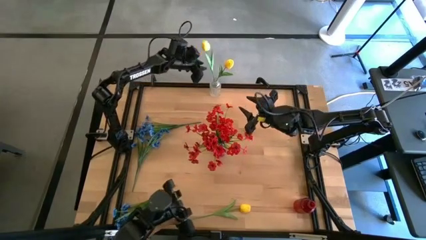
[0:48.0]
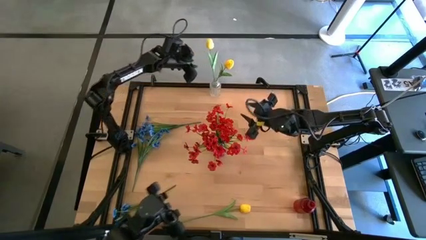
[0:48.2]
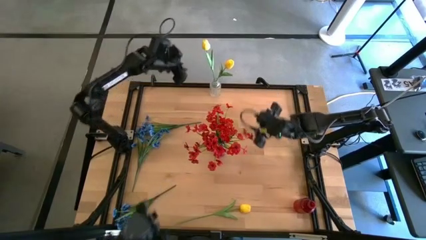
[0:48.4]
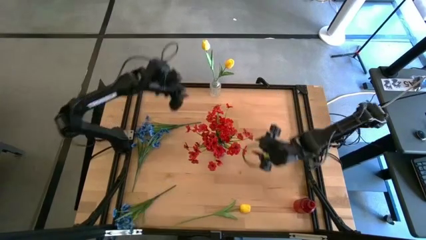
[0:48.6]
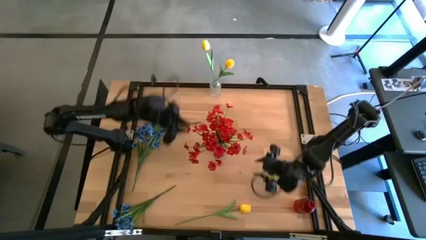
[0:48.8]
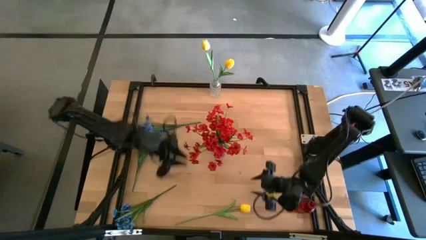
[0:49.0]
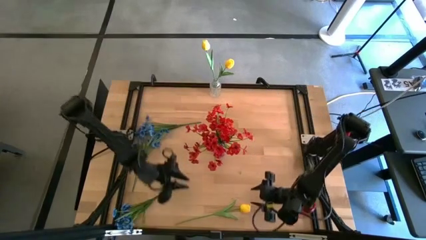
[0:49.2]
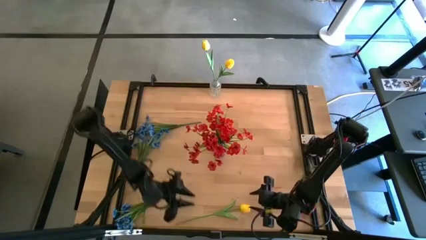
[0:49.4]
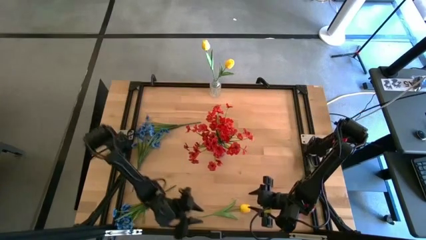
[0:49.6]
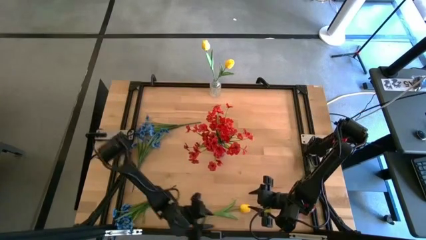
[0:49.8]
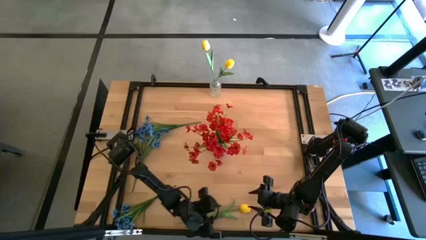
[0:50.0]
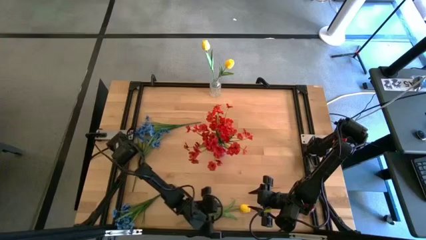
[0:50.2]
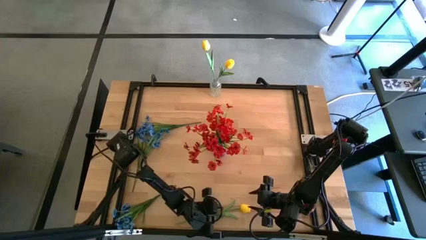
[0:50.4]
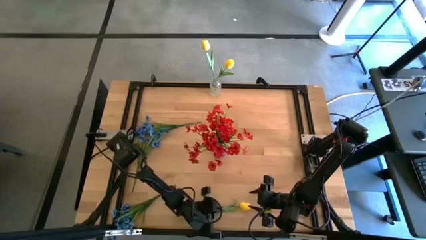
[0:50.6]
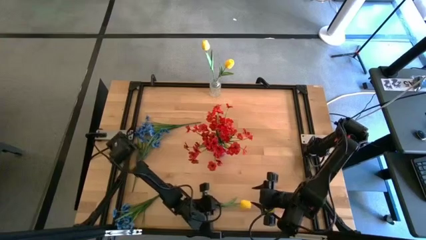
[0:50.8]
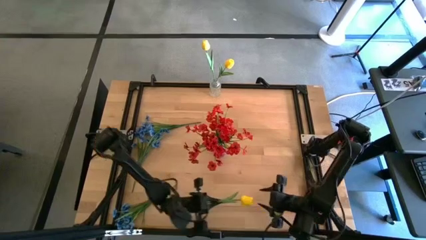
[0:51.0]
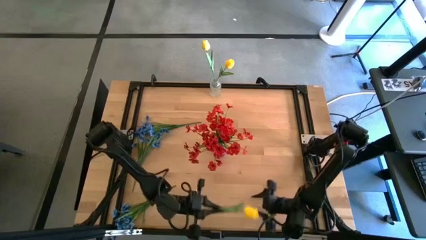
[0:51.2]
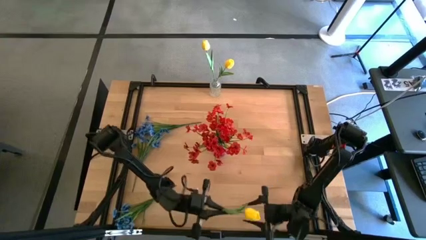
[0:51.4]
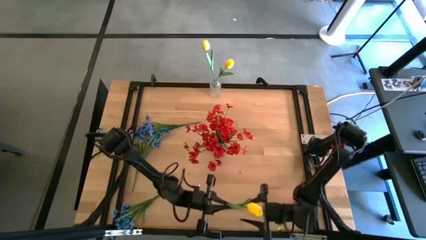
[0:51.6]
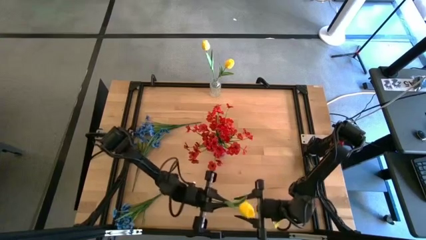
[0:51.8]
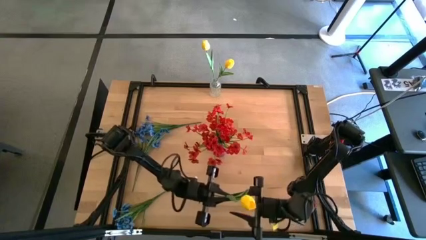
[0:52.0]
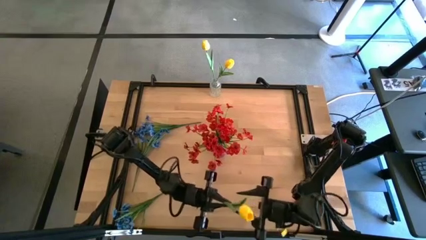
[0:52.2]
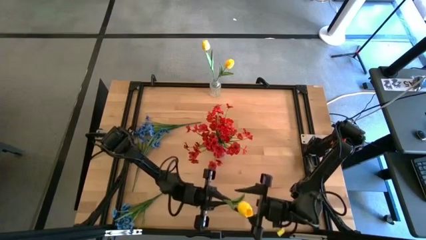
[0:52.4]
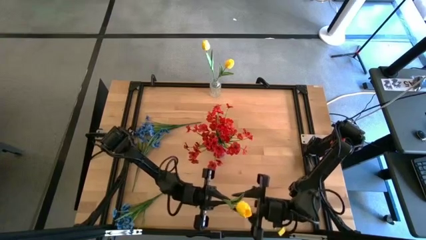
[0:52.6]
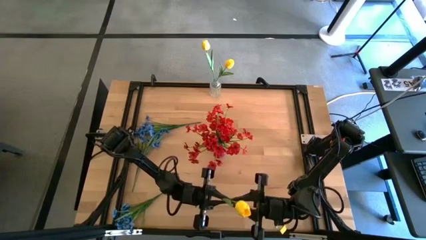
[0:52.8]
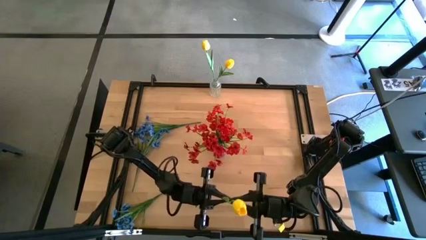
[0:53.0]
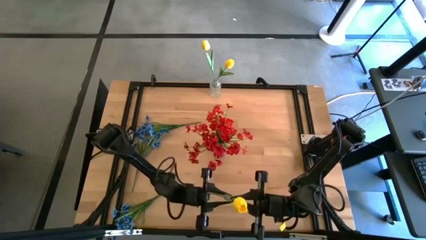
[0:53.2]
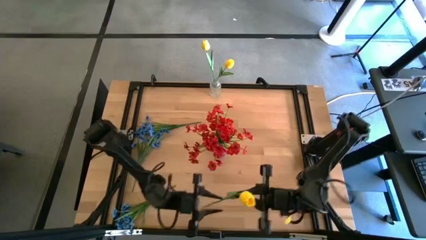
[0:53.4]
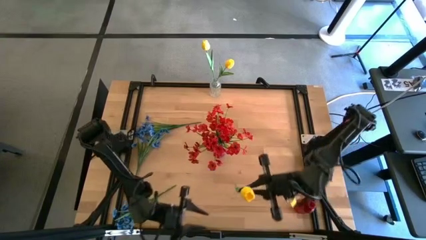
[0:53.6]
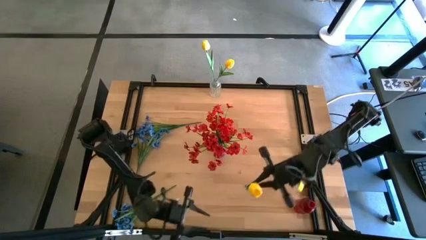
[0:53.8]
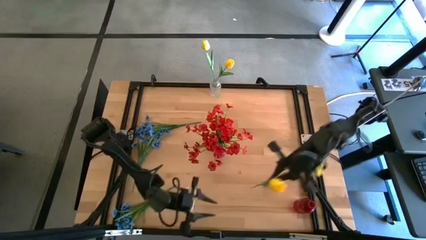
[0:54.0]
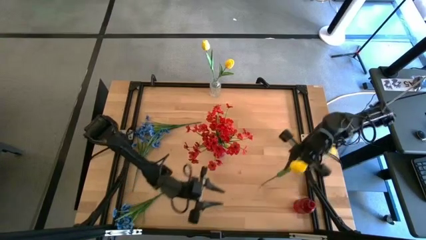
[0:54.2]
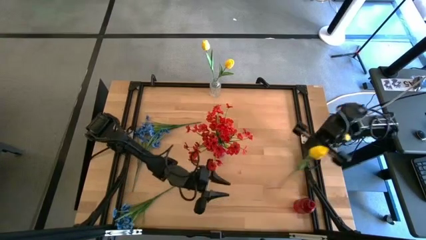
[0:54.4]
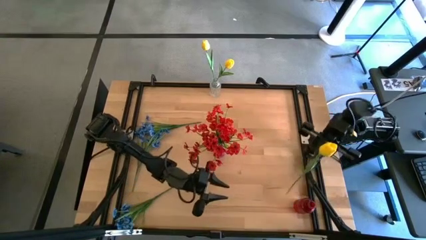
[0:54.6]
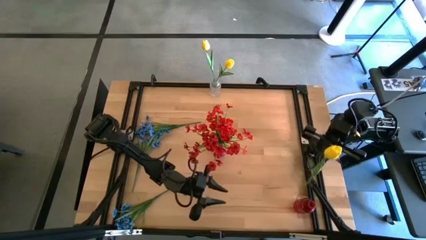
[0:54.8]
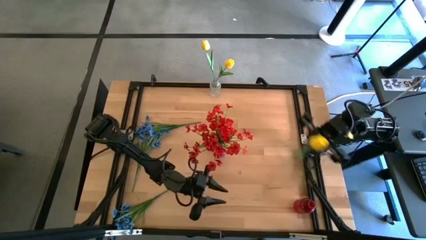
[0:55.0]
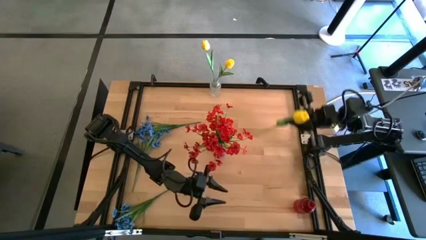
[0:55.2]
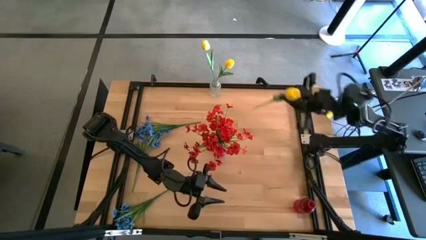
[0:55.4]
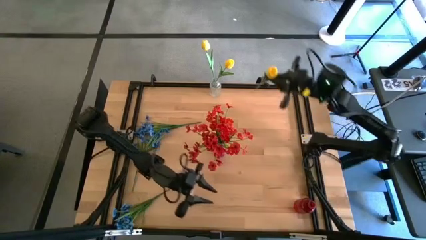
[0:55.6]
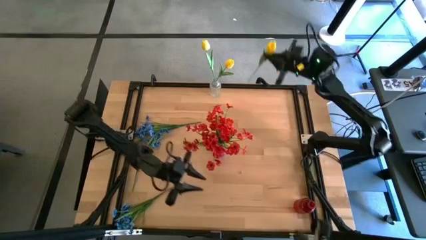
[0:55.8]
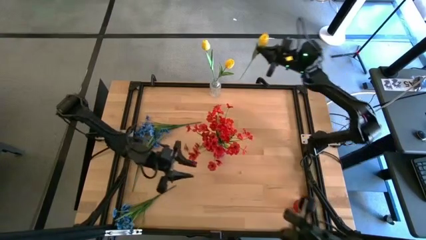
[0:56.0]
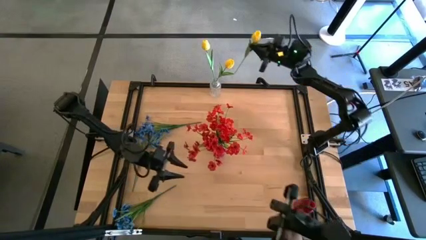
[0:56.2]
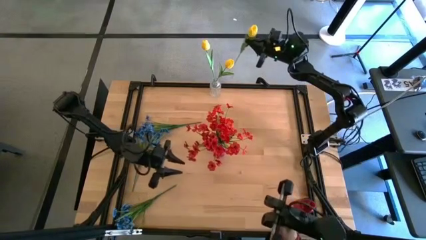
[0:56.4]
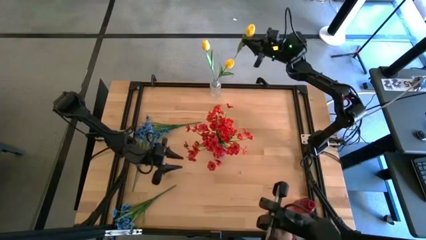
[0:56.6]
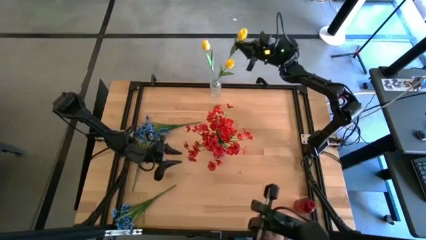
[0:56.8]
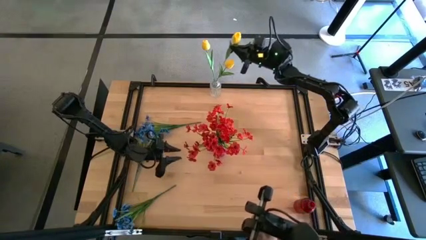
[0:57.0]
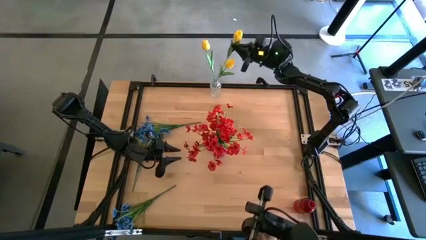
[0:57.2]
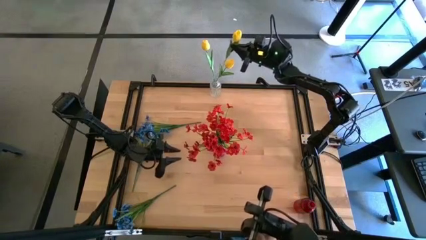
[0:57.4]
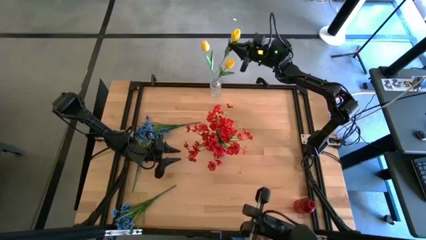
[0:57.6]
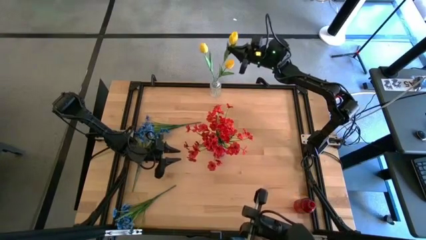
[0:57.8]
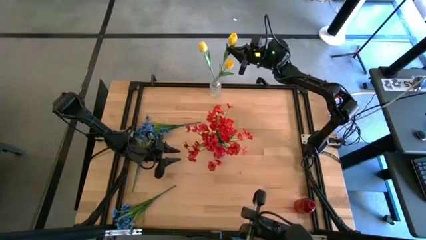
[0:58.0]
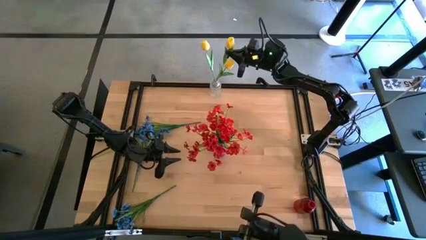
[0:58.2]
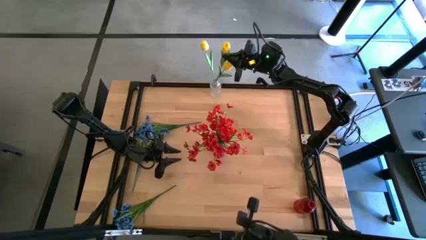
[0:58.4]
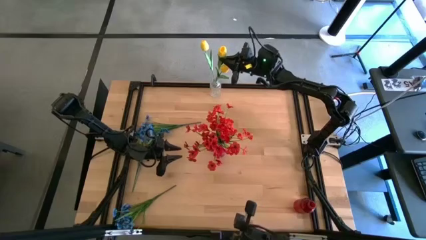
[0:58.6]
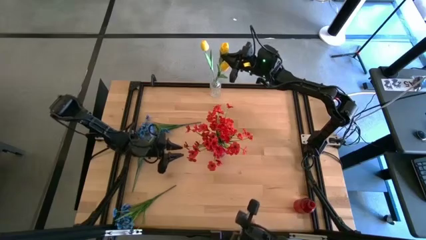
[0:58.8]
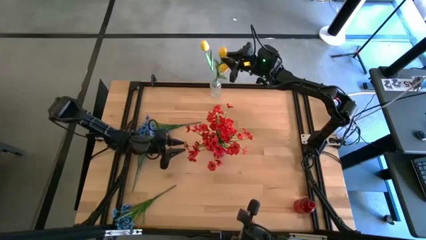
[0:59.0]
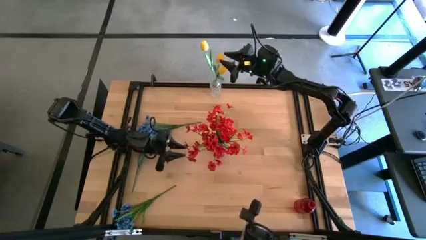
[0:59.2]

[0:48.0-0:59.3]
Task: Sort flowers into vase by color
Put the yellow tulip into the transparent vase

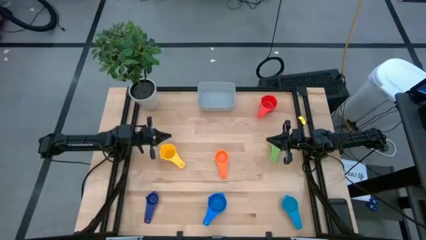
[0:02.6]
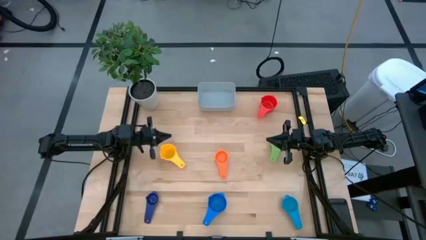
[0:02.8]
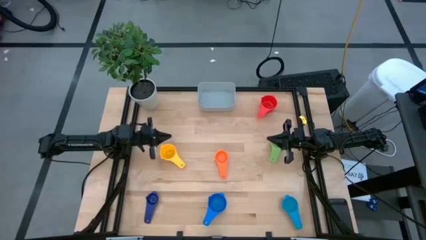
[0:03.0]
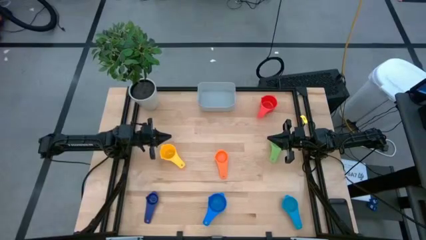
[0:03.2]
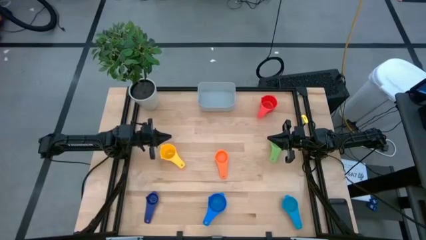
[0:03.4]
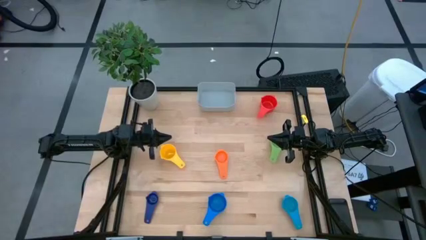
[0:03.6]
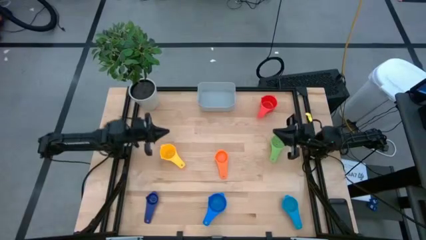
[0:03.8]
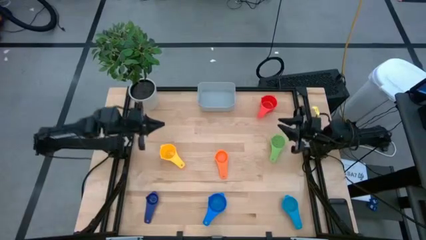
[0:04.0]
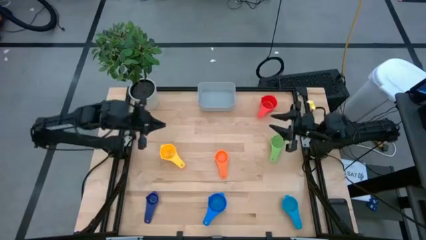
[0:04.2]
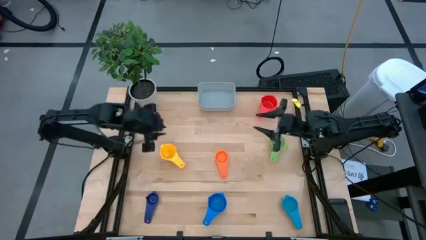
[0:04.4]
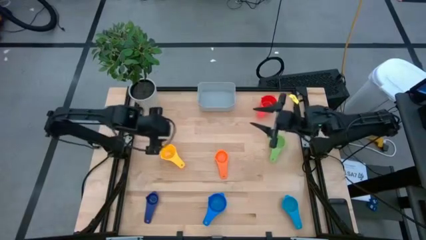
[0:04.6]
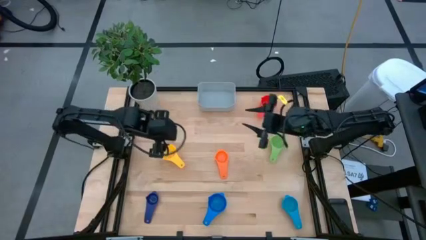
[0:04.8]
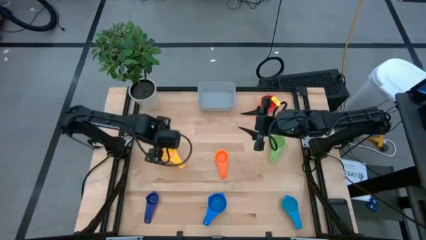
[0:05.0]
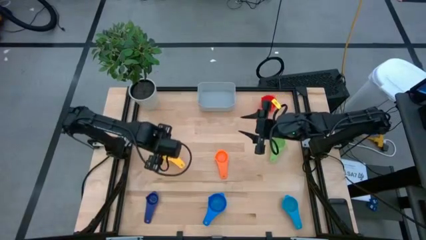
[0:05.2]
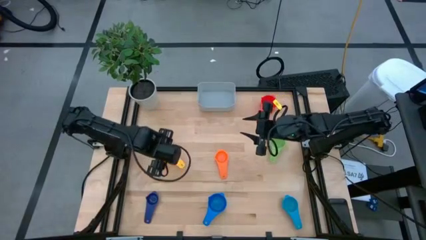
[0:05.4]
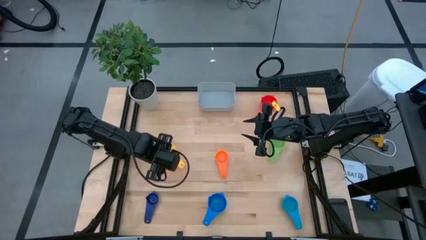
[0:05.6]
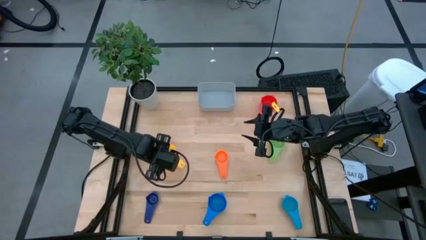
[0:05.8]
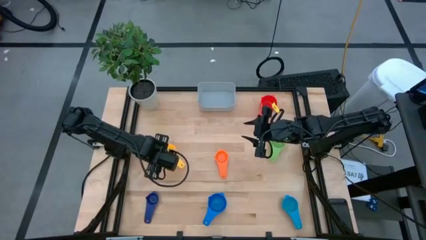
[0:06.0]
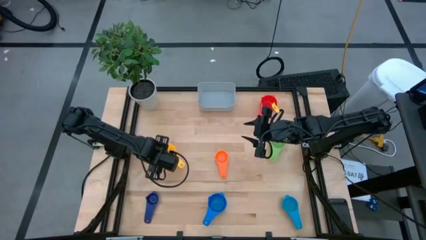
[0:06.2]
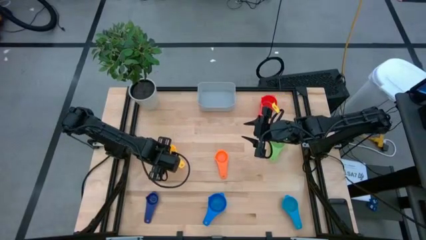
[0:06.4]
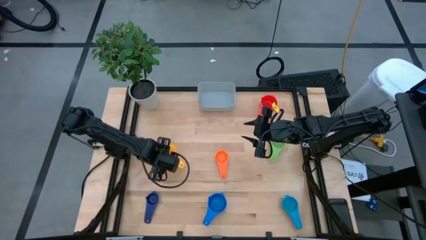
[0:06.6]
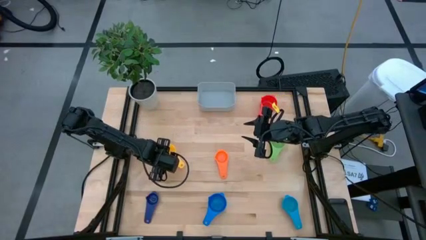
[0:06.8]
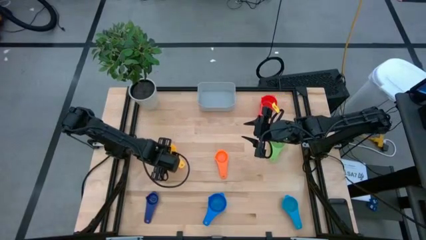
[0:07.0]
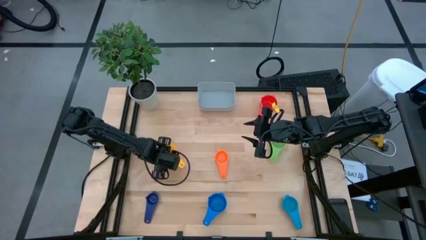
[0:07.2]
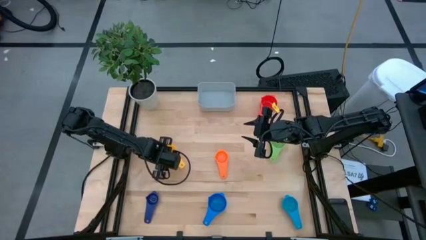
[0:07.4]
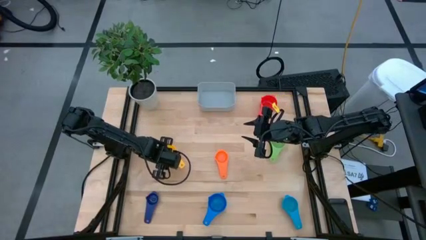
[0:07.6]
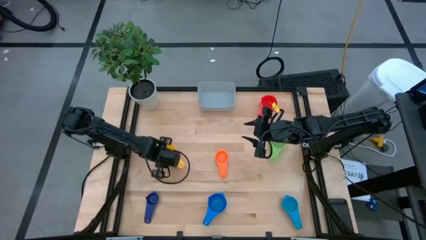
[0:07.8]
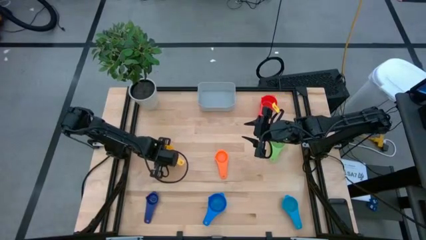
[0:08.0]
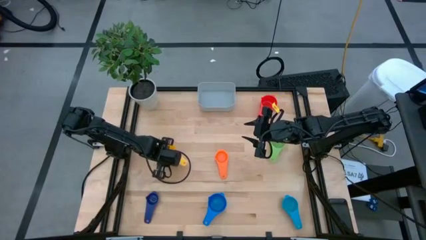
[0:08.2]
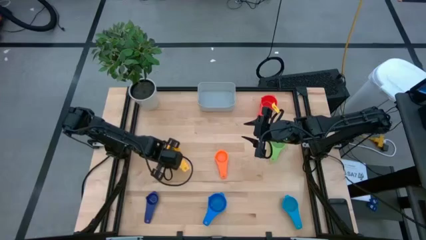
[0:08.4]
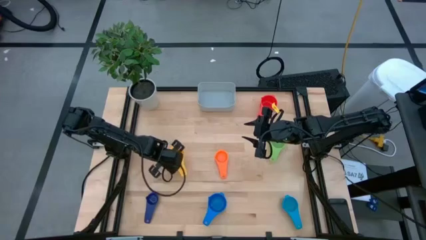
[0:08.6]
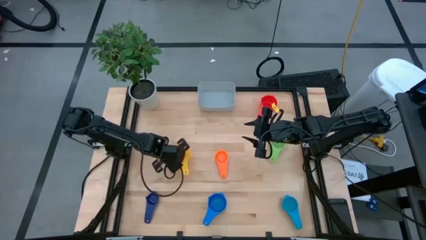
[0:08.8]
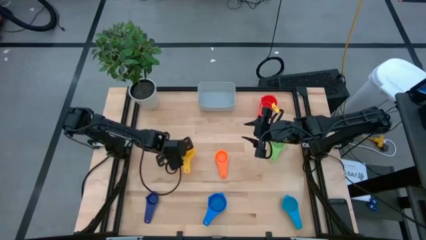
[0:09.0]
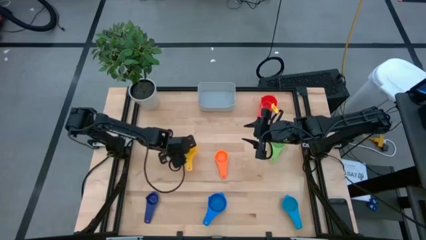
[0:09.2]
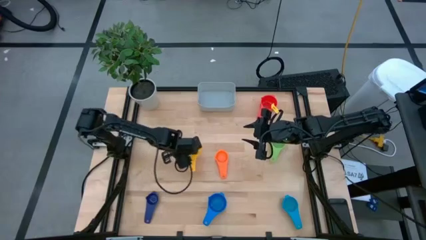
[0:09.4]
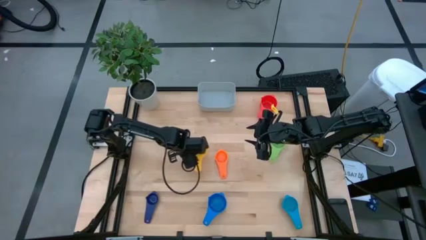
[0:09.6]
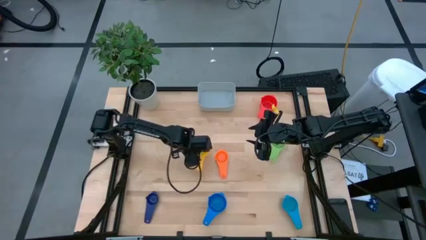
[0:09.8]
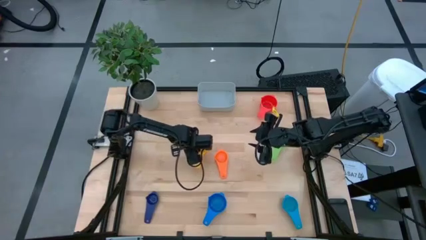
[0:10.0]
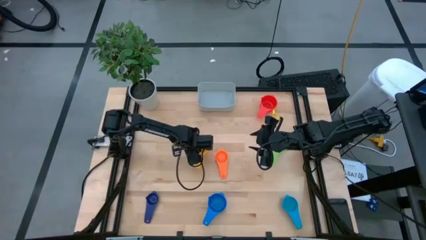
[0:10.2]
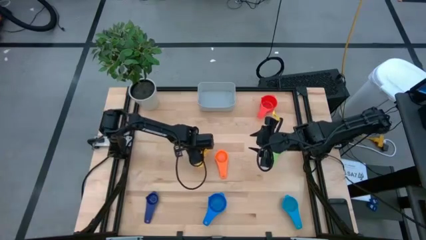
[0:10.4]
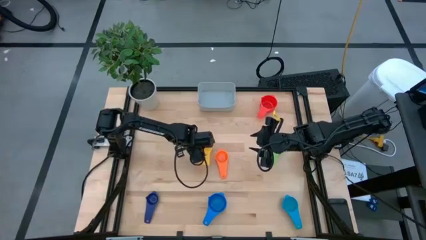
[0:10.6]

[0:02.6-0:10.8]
Task: Nest measuring cups in basket
Move the yellow measuring cup to the center of the table
